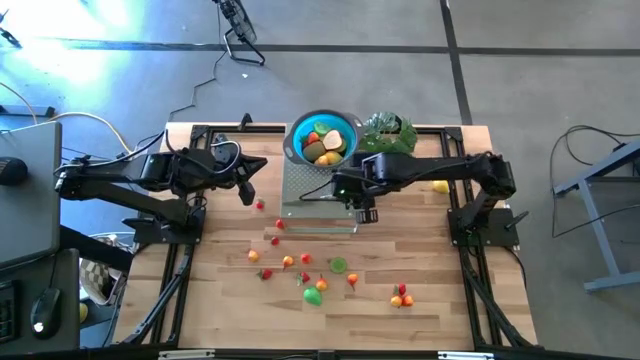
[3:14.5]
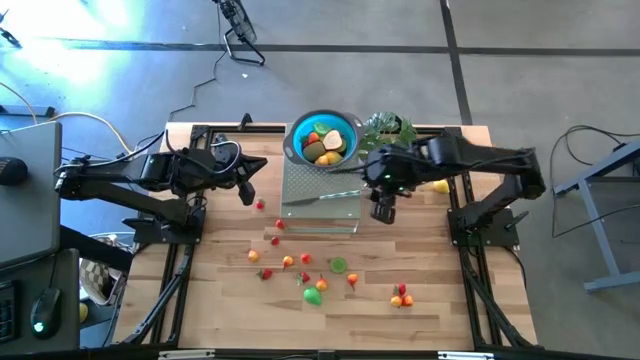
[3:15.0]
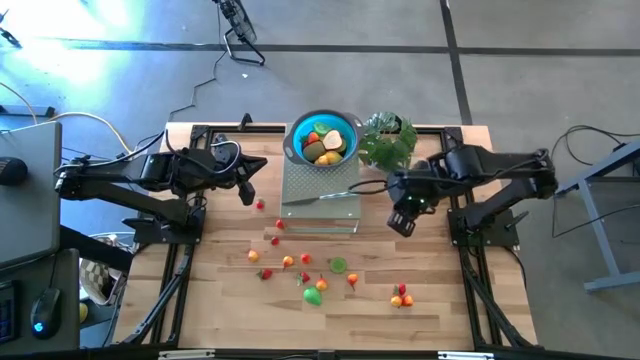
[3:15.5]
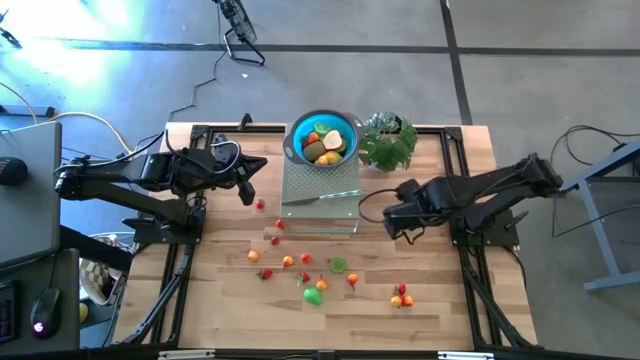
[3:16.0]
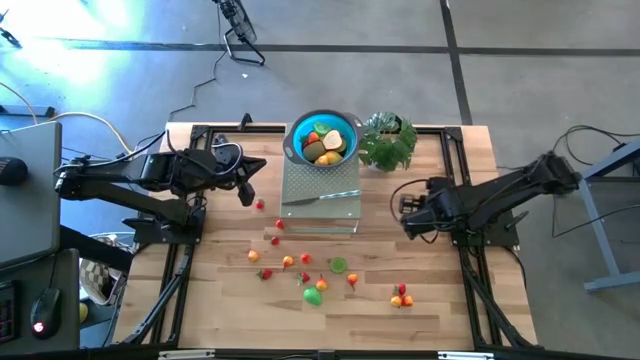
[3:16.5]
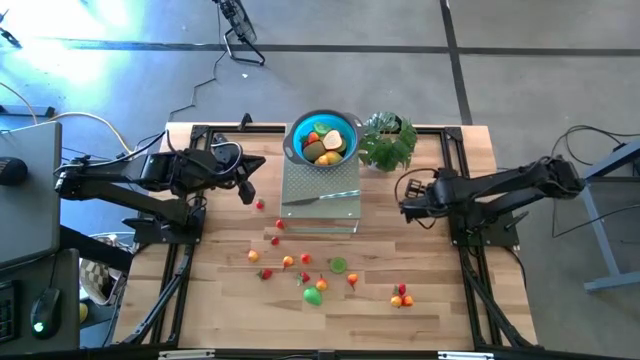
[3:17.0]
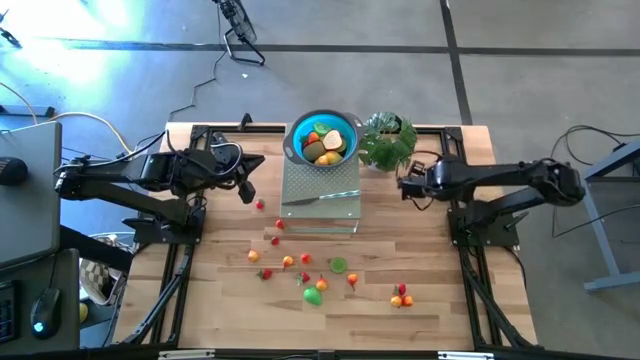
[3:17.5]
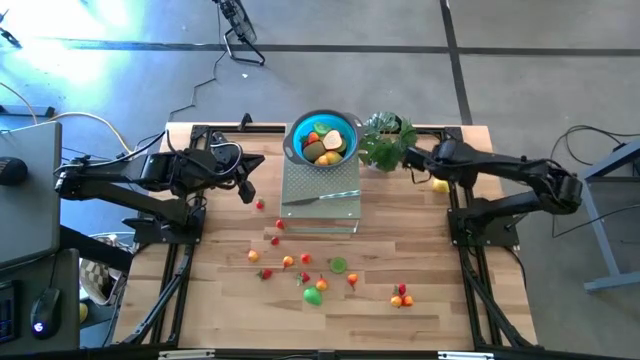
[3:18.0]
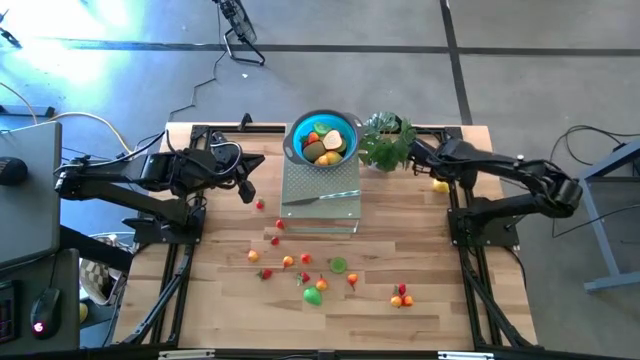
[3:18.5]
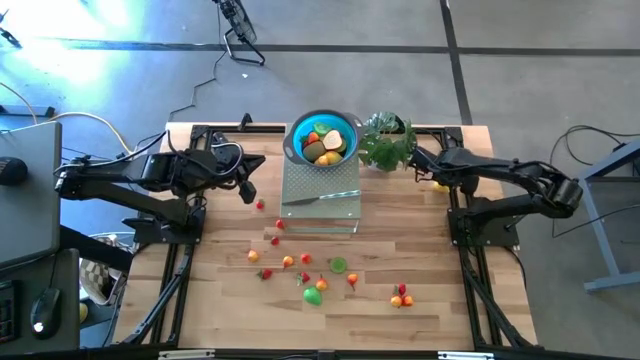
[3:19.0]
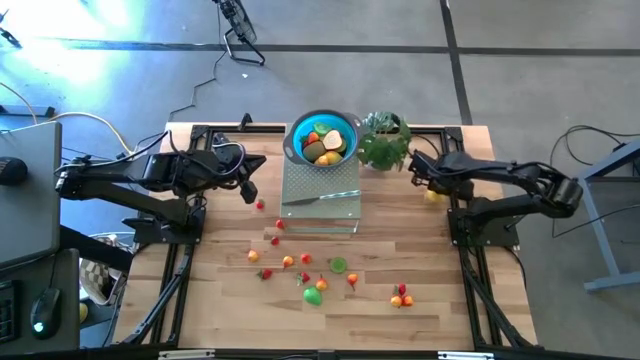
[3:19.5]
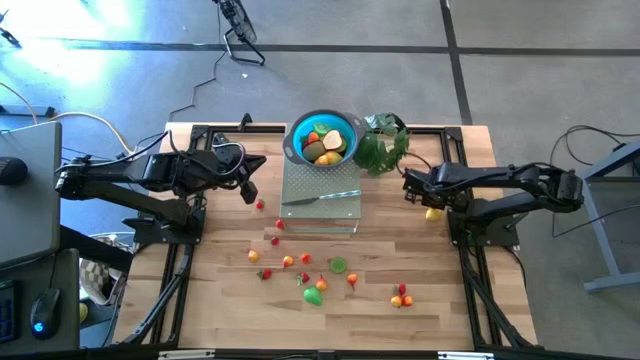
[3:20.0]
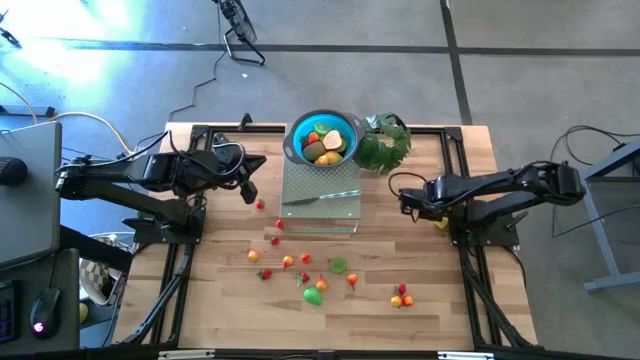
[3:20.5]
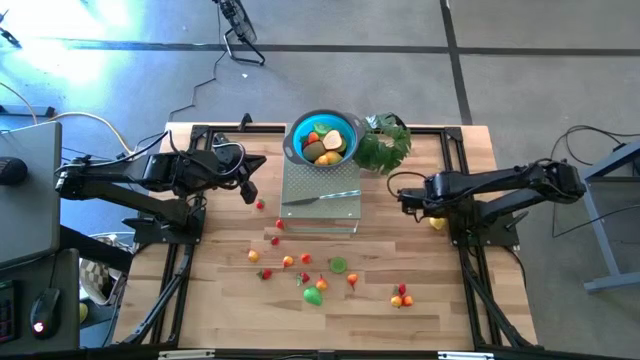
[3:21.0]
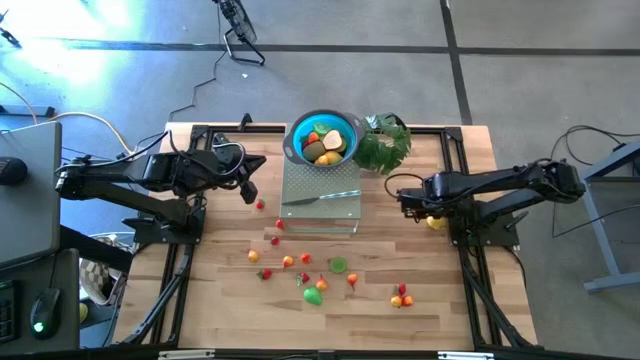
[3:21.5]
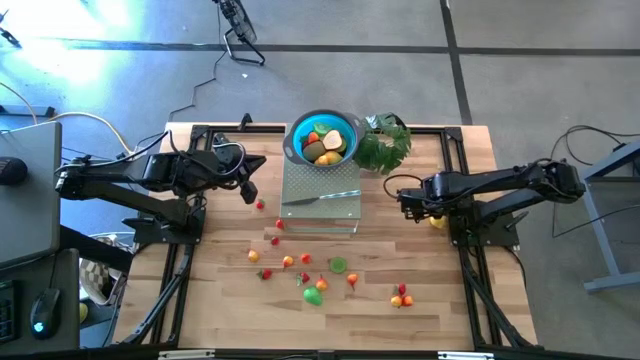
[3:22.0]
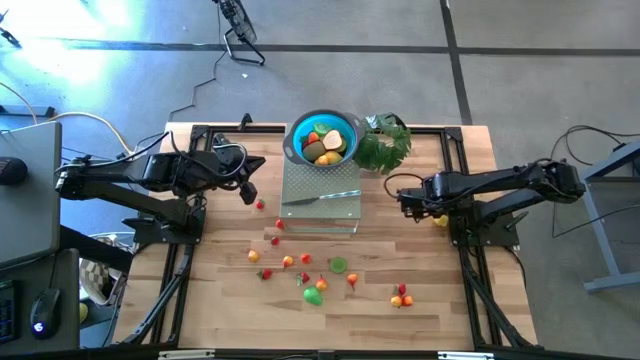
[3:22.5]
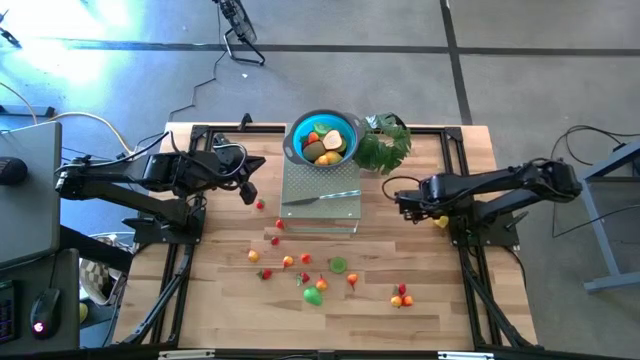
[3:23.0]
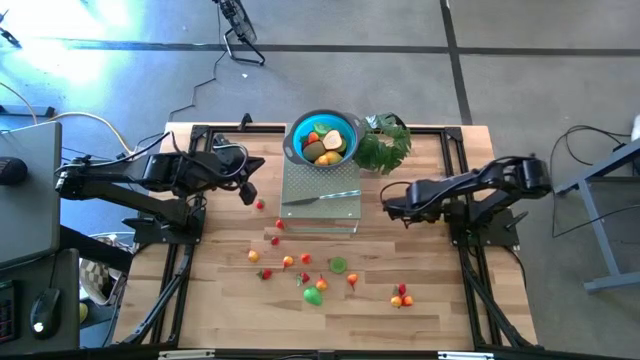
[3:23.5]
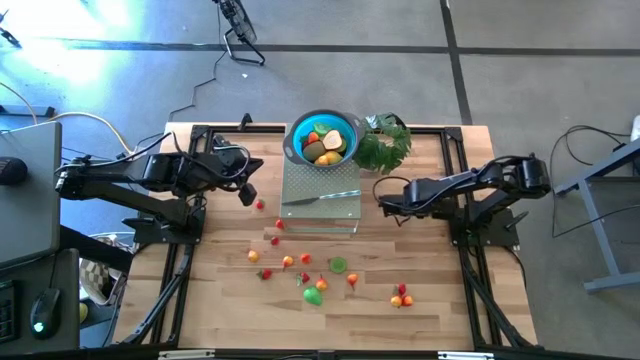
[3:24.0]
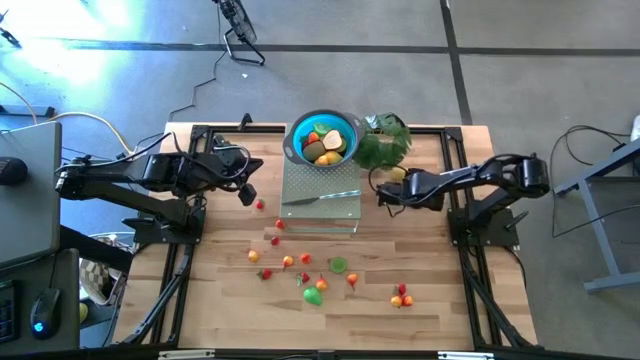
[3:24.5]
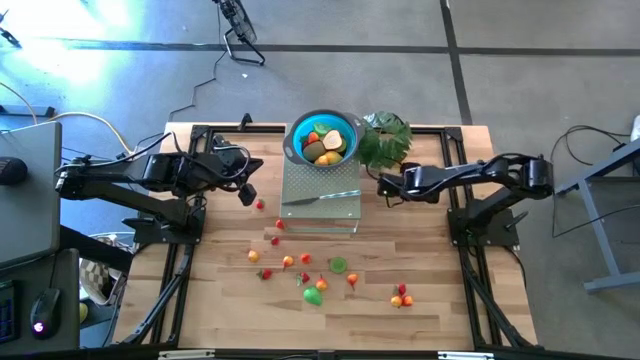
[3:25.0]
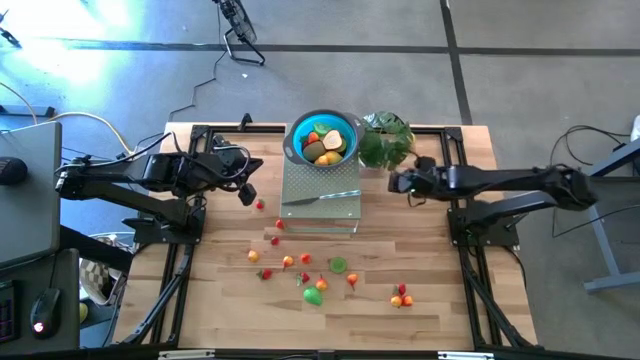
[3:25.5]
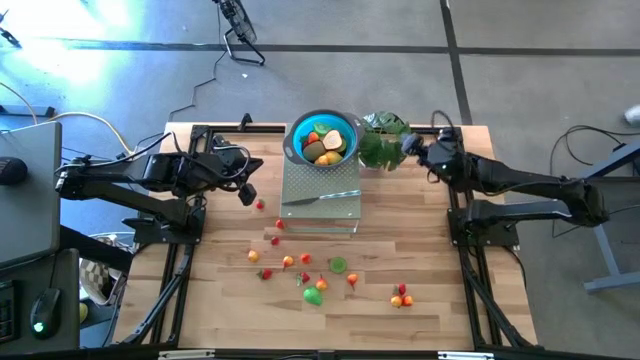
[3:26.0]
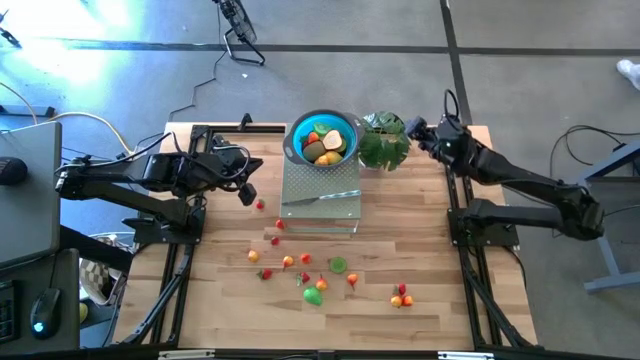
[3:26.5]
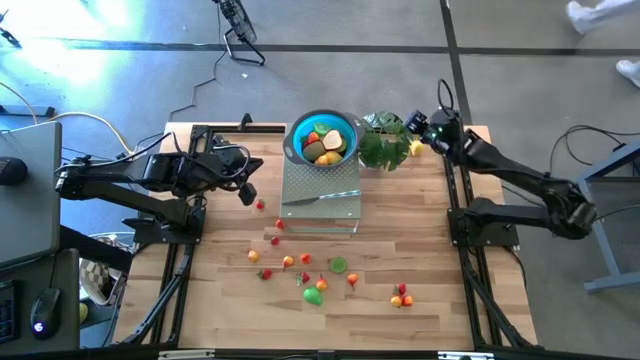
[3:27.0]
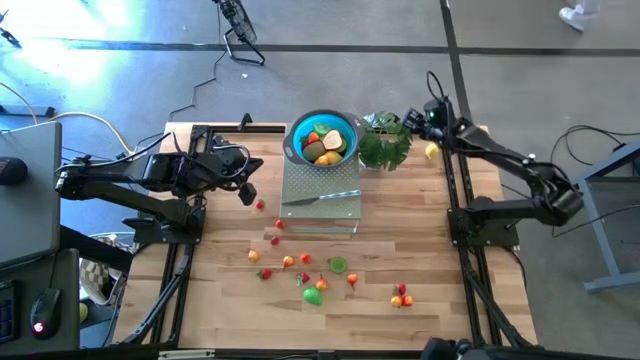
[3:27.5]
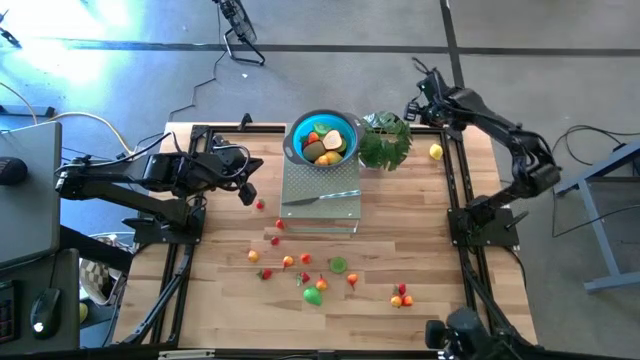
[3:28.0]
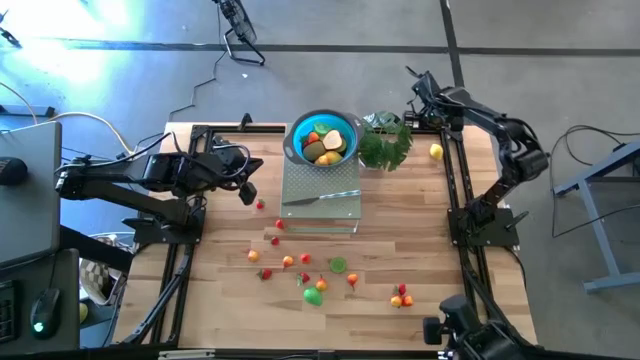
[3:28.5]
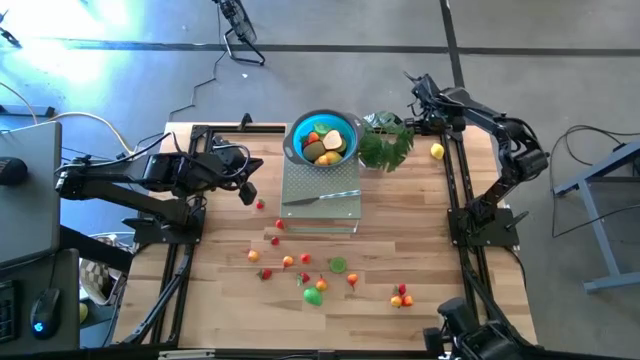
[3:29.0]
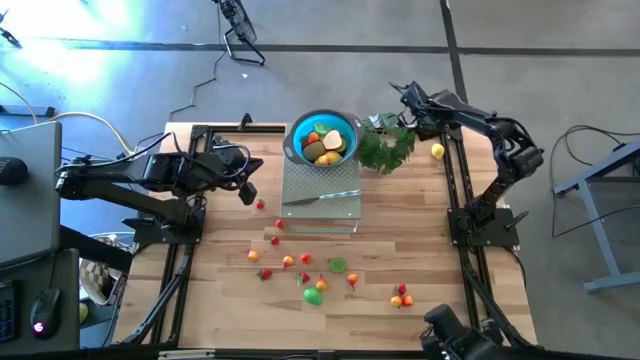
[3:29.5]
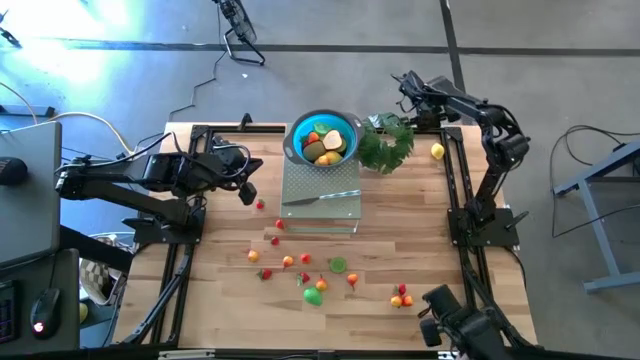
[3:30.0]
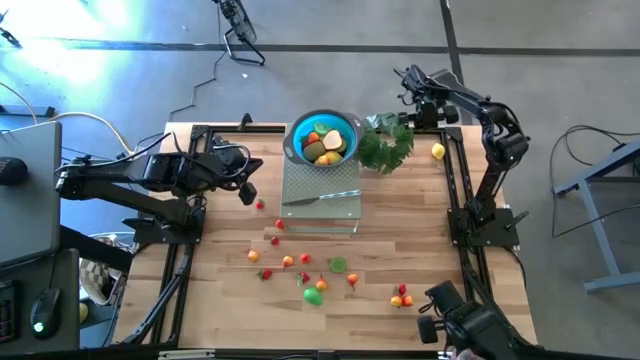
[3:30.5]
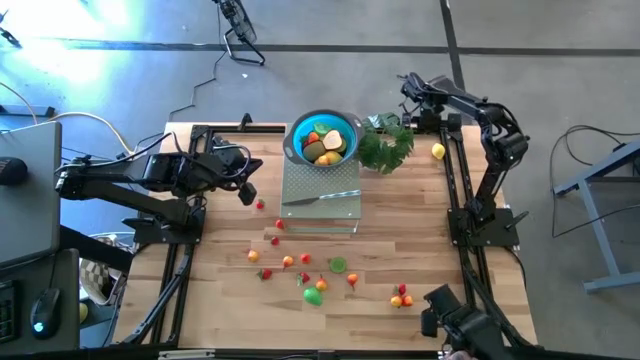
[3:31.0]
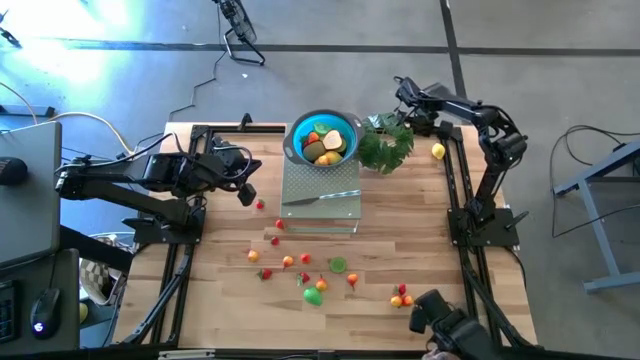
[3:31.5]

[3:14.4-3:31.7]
Task: Pick & Place Fruit
Put the yellow lemon in the blue bowl on the shelf

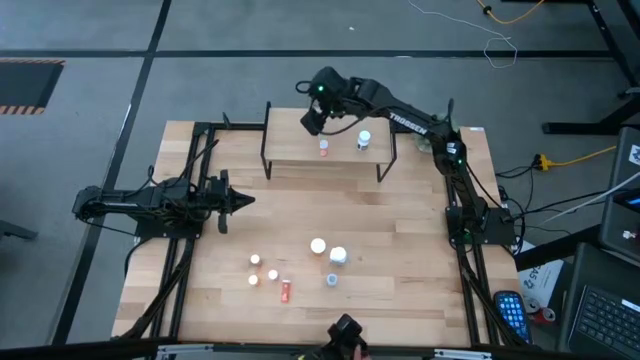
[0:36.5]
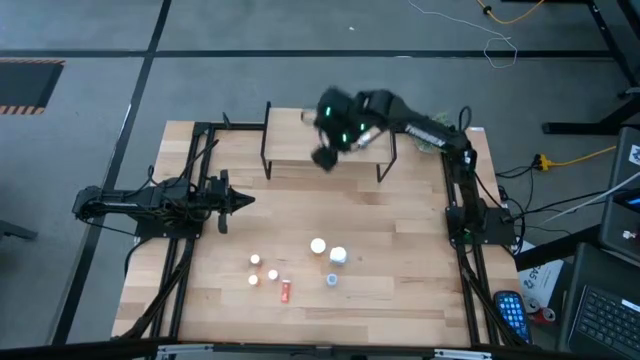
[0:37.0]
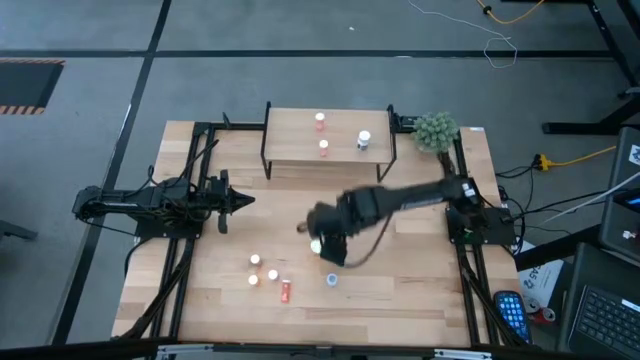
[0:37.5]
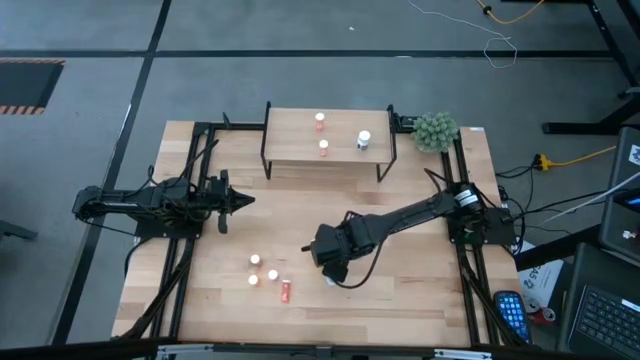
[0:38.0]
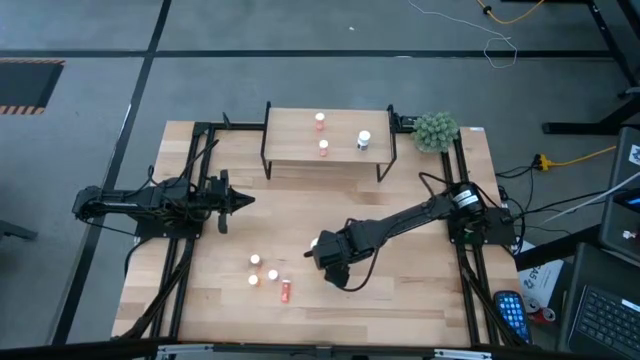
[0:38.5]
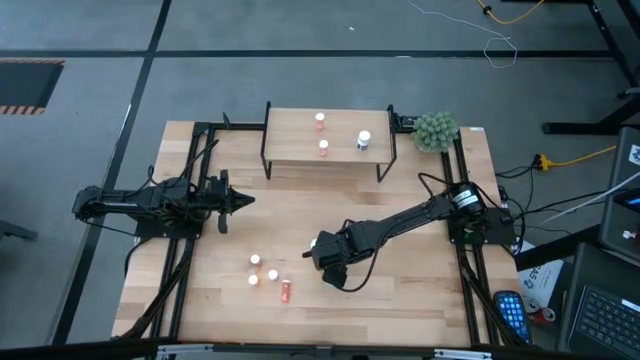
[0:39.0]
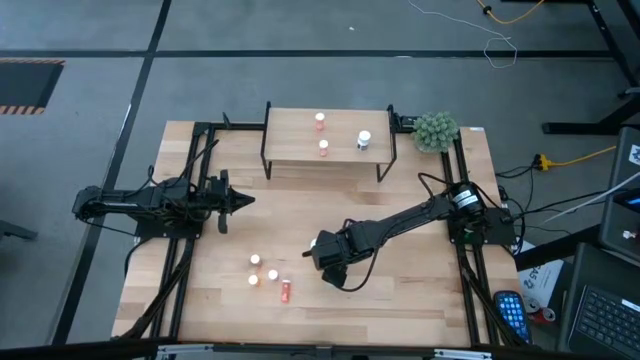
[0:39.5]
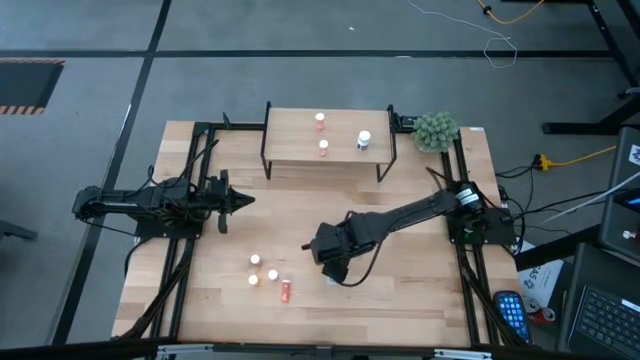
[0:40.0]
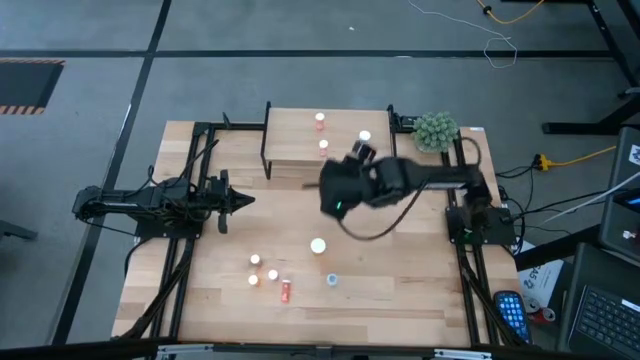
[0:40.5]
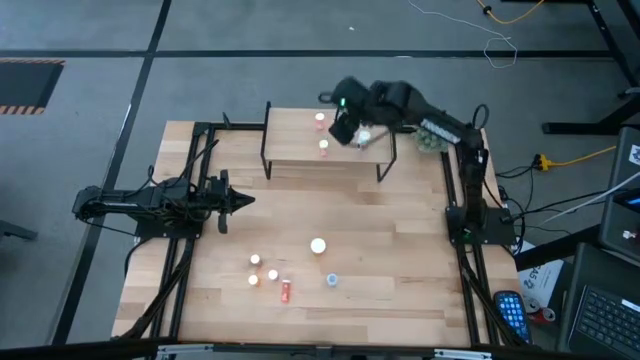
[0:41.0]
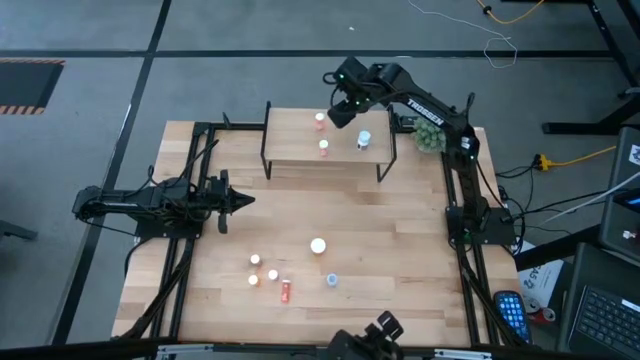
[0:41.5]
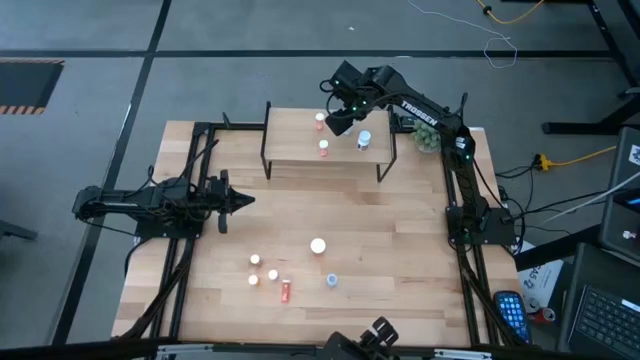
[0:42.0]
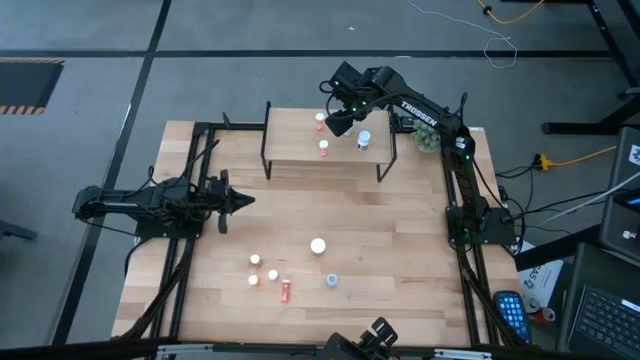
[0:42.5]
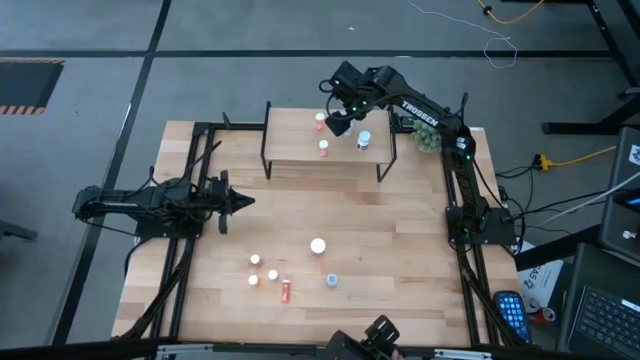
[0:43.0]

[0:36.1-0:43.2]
Task: Pick and place medicine bottles onto shelf by color
Put the large white pill bottle on the shelf
